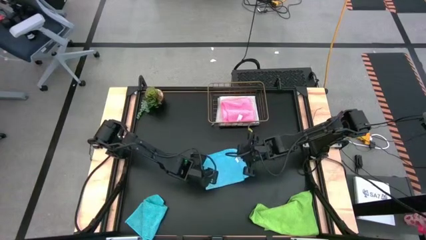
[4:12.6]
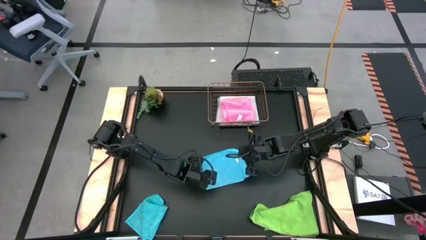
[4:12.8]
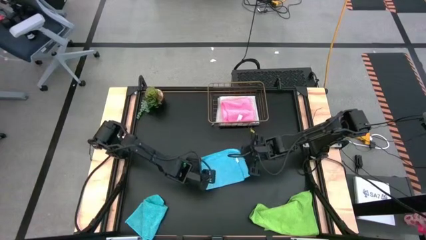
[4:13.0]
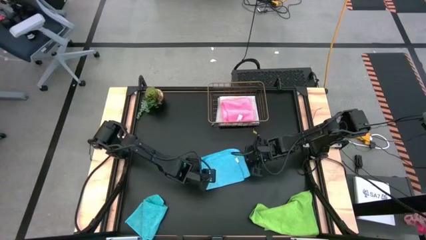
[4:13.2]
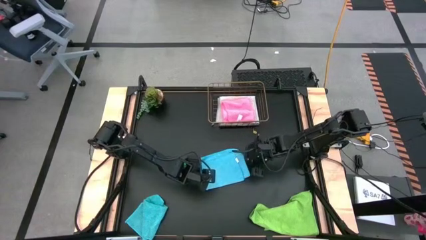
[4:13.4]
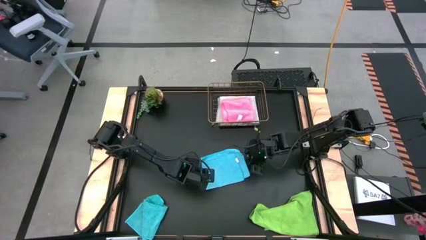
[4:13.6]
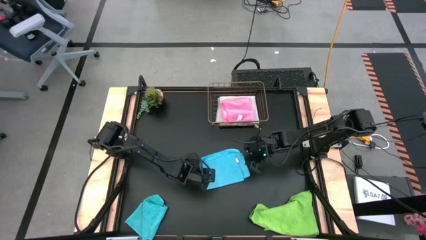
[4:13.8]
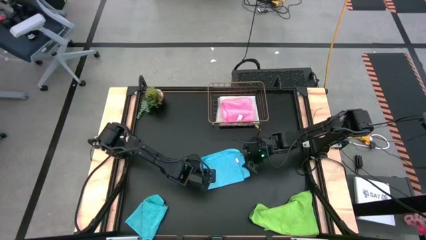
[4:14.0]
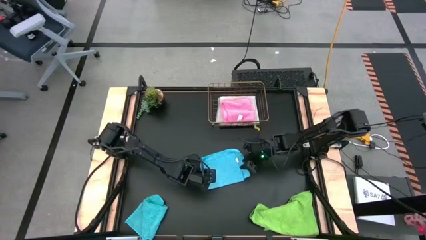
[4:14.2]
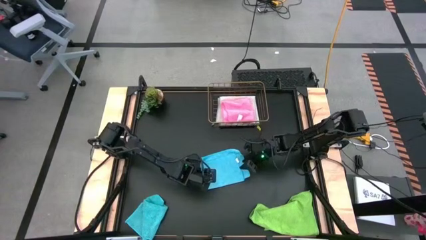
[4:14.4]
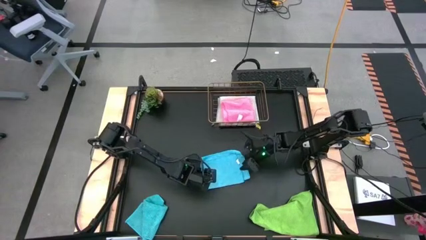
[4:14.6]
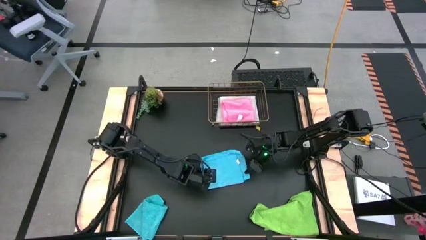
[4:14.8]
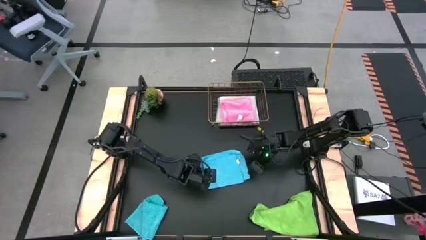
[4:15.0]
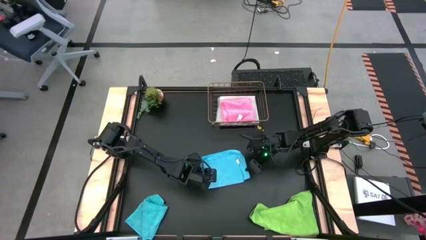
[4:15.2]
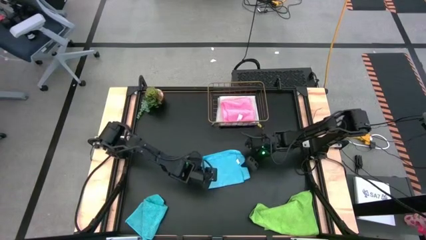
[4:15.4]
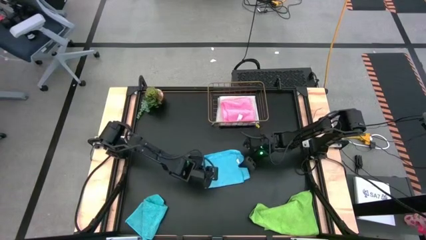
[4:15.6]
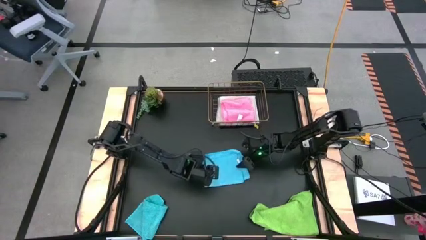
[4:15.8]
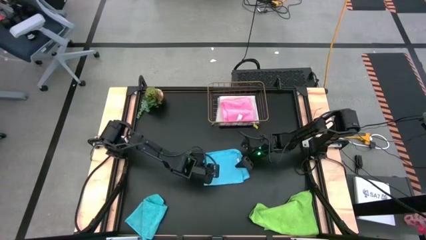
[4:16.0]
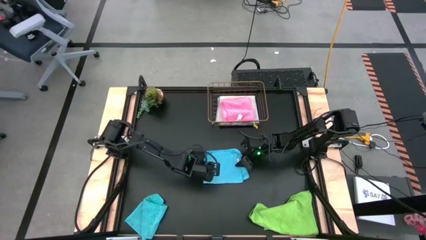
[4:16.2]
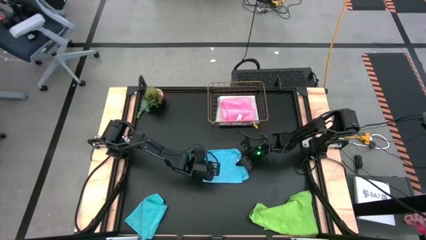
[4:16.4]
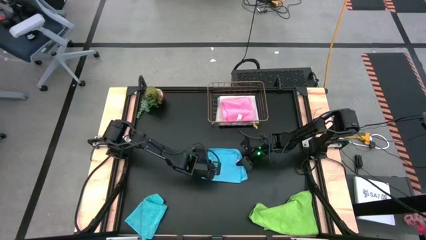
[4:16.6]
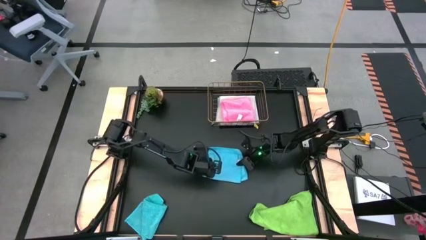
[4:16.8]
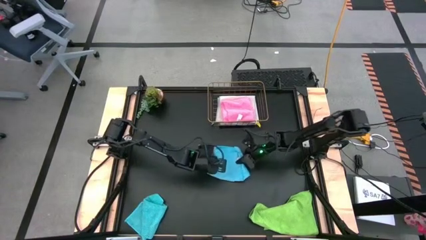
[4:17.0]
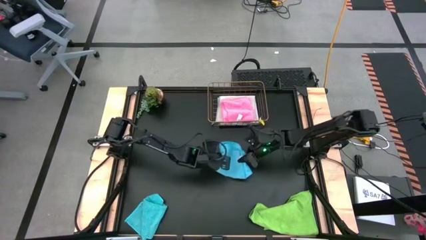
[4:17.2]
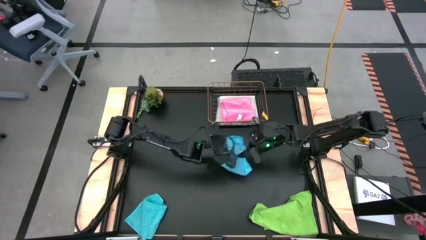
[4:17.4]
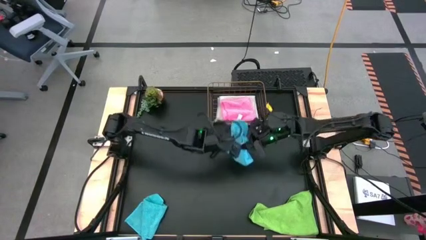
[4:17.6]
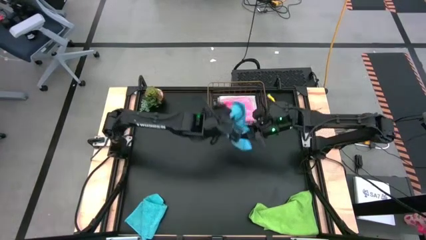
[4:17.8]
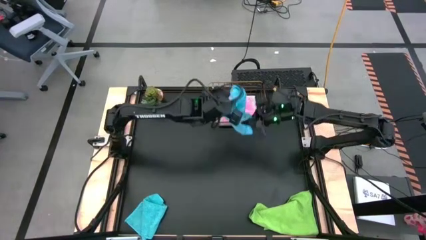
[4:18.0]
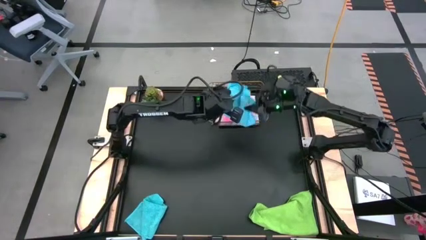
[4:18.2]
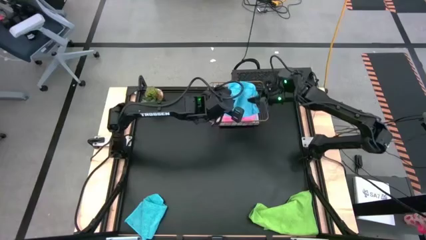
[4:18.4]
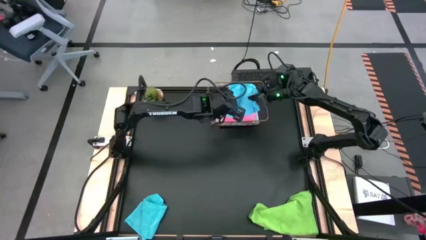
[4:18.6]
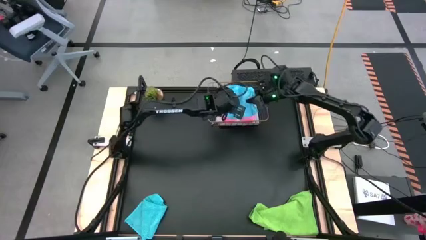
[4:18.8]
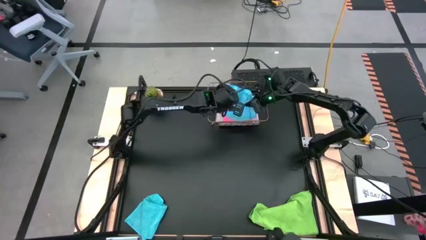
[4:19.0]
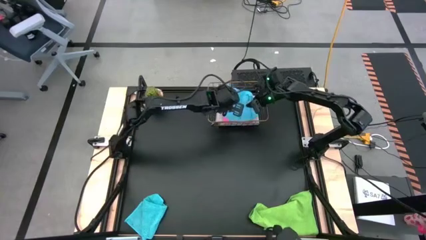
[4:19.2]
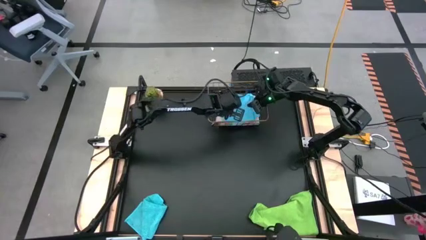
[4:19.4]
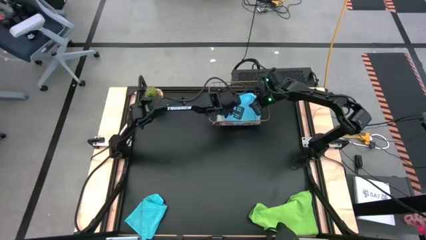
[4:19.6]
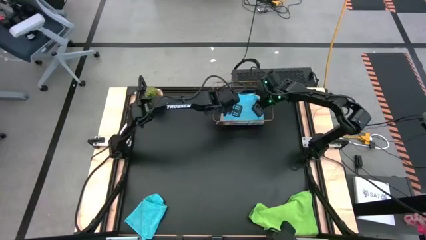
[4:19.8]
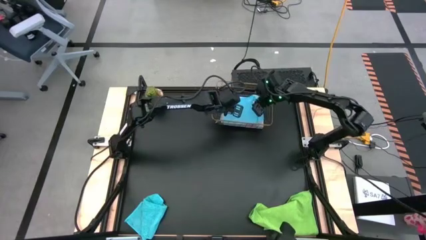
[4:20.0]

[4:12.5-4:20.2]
Task: Fold microfiber towels
Put the right blue towel into the wire basket

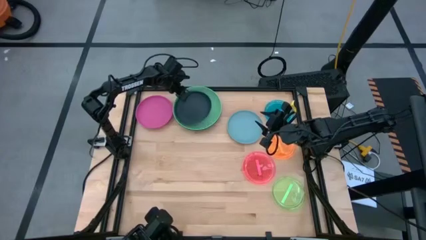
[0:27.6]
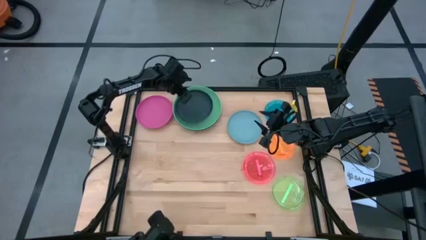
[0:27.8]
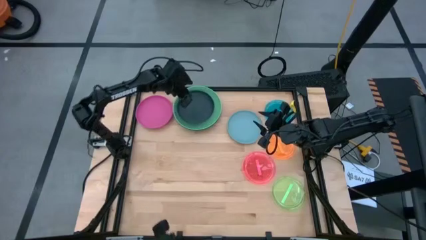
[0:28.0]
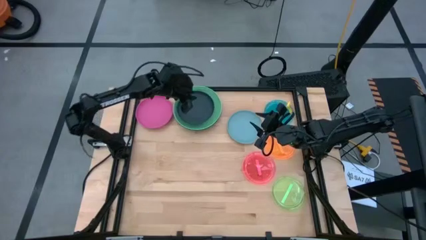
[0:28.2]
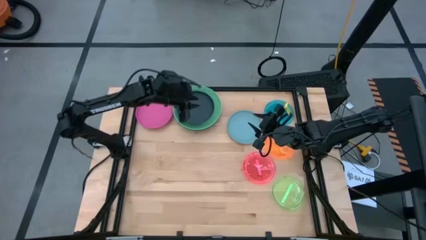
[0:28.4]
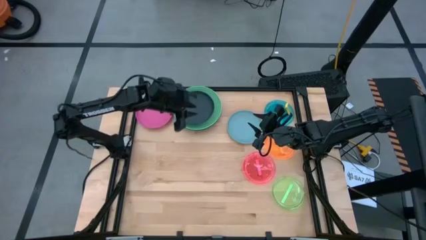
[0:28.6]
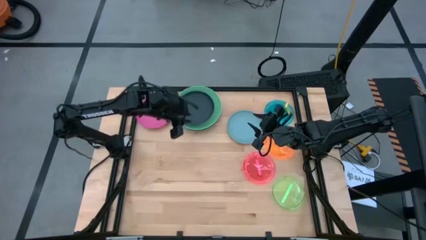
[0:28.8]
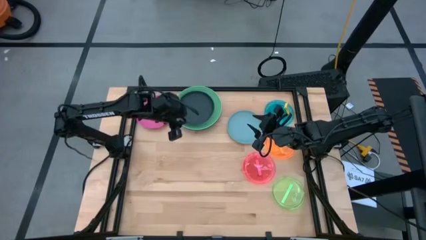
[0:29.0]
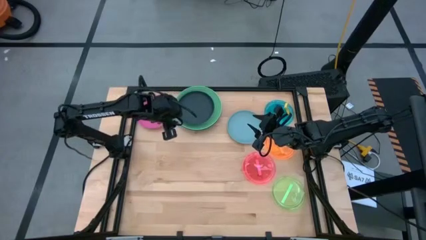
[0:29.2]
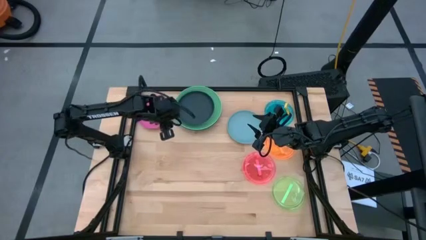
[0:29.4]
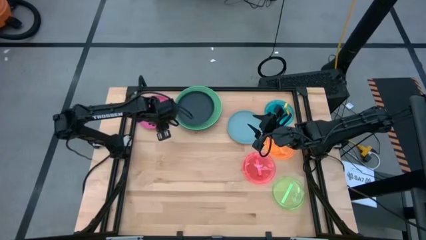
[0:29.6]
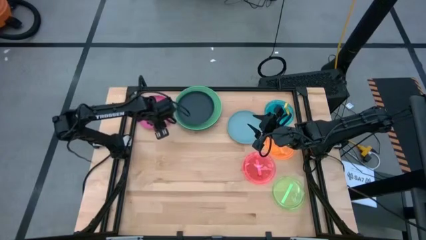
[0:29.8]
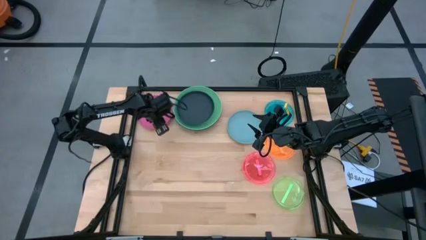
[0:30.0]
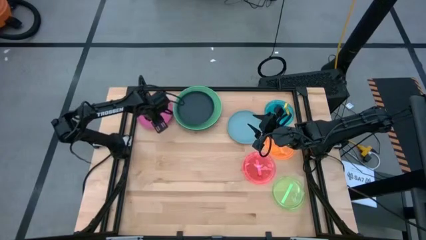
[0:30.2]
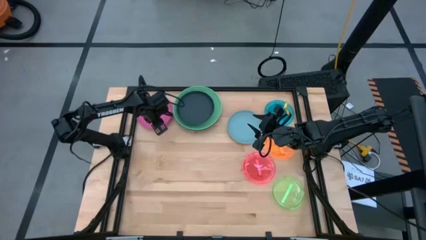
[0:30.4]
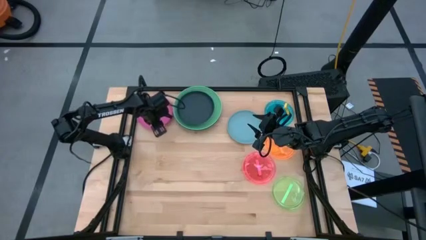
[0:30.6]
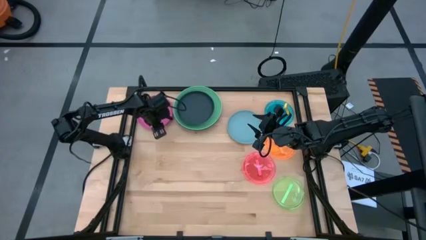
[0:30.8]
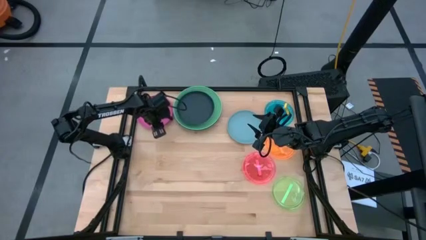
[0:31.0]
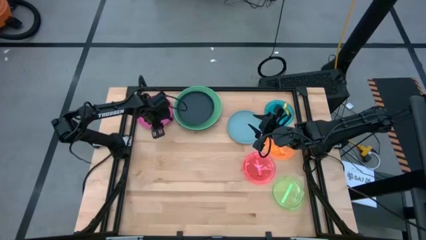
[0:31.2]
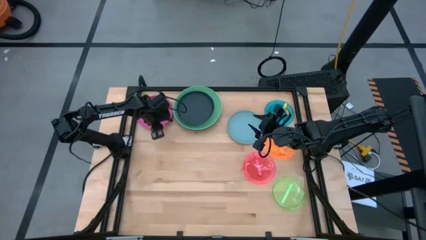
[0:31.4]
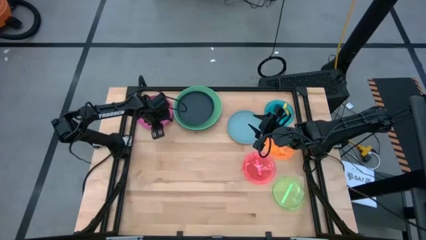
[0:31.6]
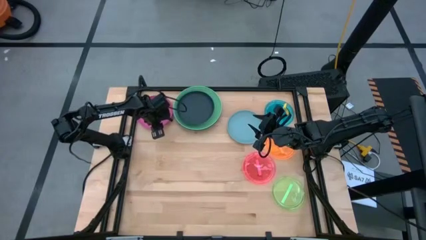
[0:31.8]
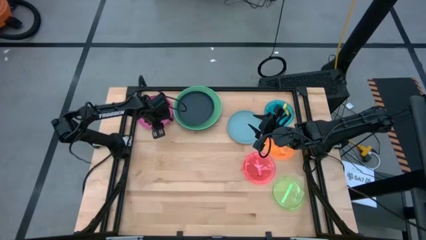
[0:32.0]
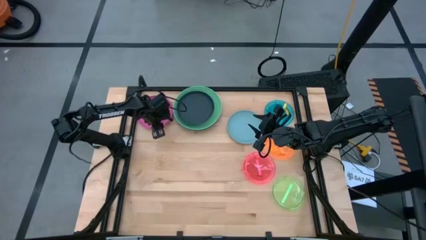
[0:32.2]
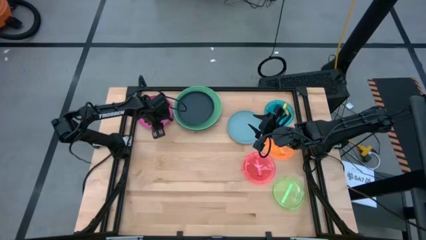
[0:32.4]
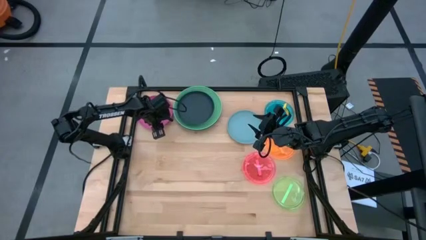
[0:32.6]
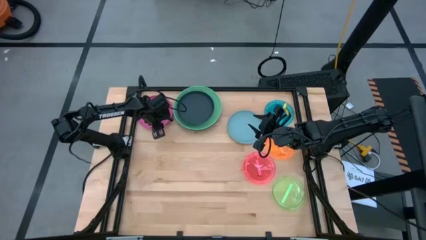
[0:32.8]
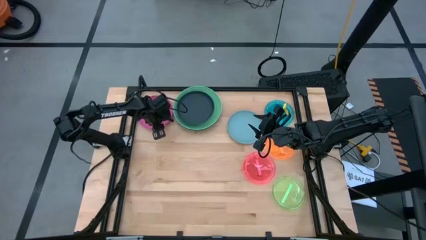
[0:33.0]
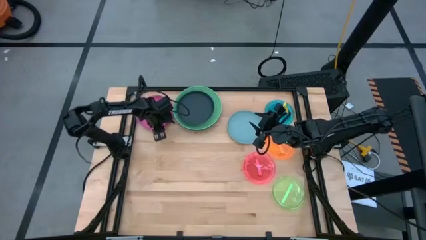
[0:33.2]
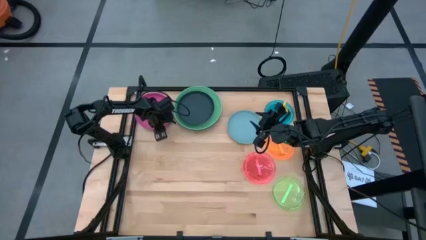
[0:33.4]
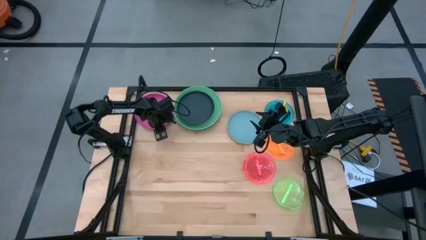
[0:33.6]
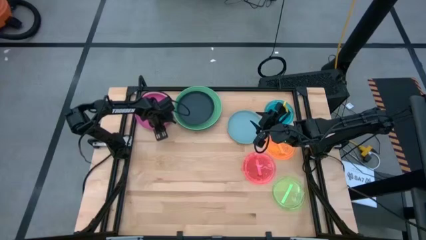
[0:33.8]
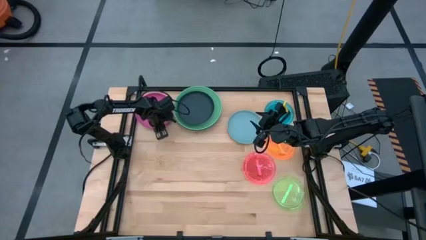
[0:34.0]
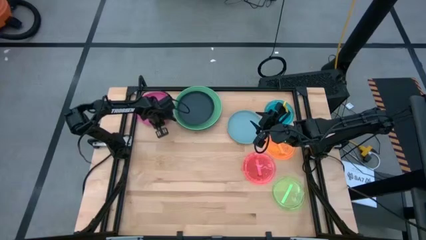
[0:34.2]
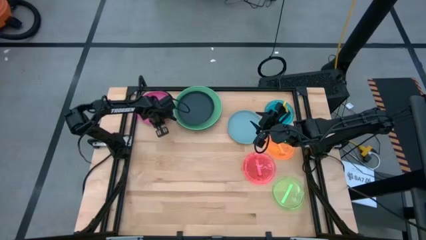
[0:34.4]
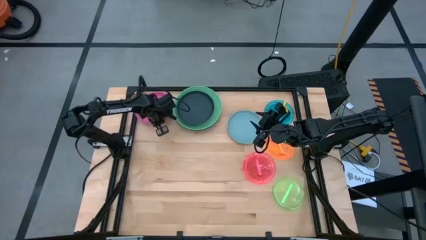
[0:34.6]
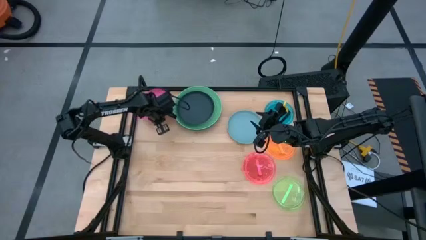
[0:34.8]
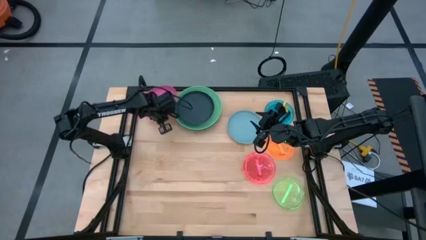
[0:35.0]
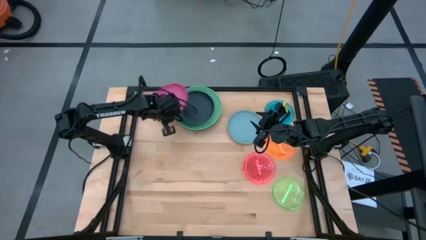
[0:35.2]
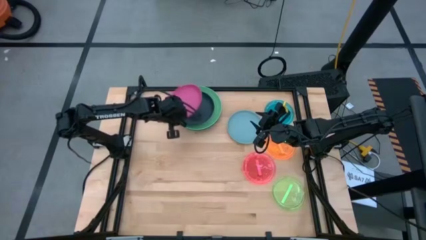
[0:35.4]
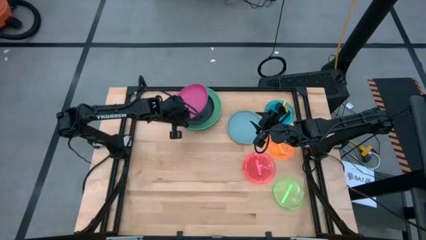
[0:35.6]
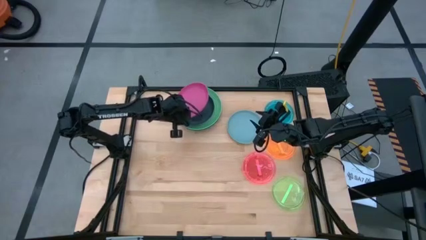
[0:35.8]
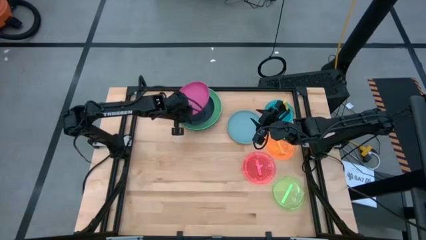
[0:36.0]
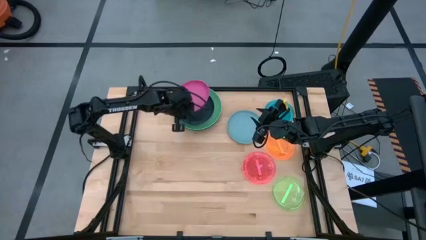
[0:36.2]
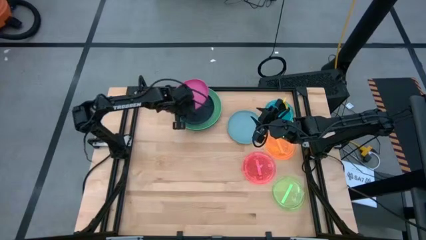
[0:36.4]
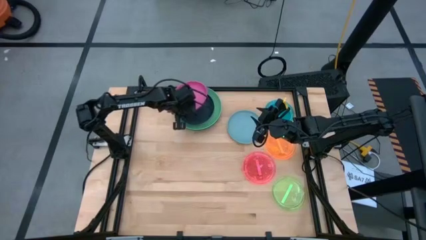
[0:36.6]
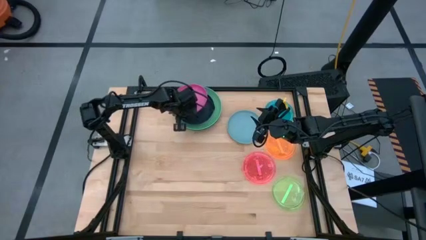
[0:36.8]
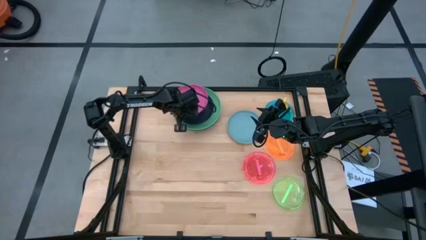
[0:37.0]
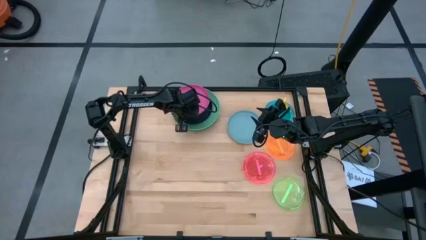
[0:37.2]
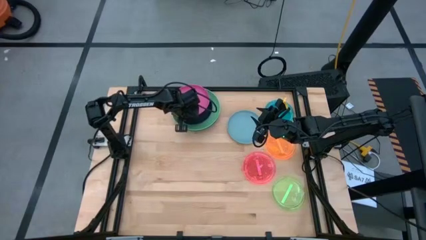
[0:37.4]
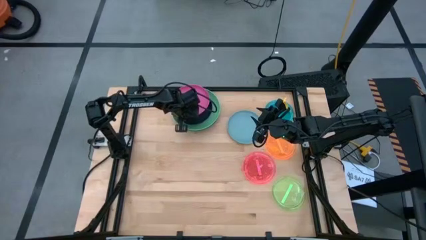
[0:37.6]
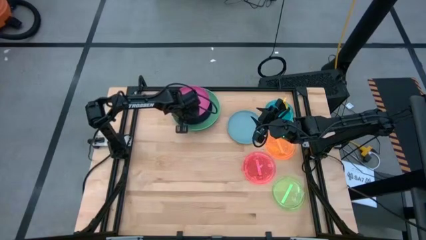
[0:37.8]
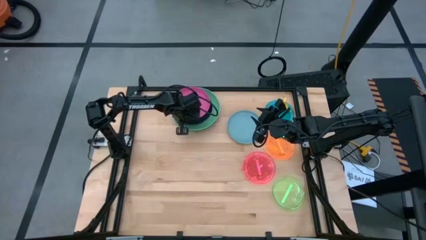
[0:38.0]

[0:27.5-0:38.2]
Task: Stack plastic plates
Stack the pink plate on the black plate
